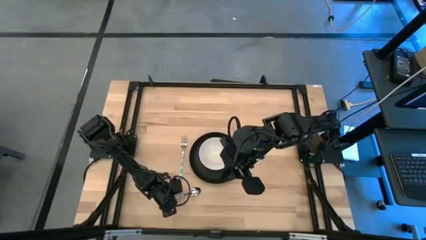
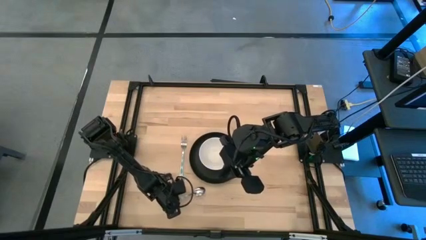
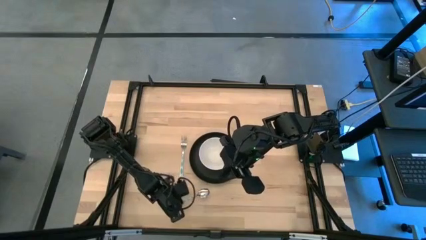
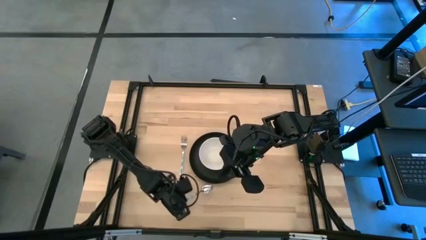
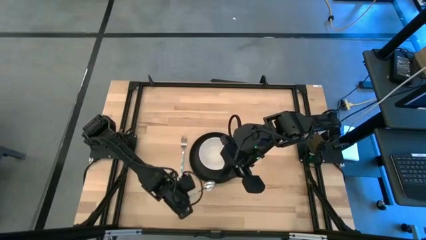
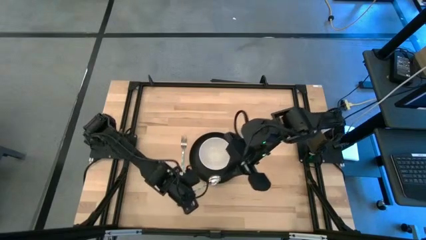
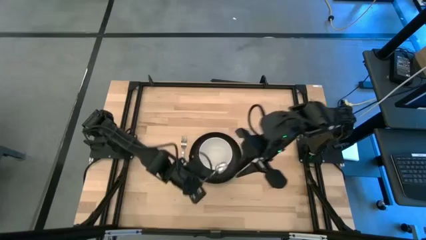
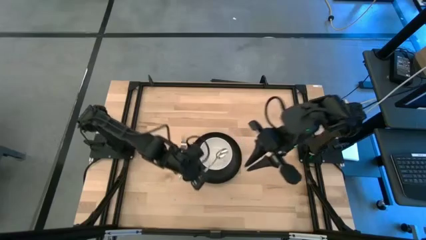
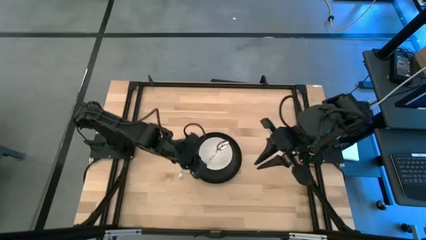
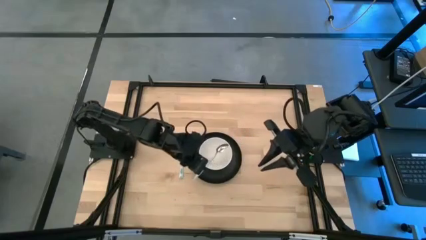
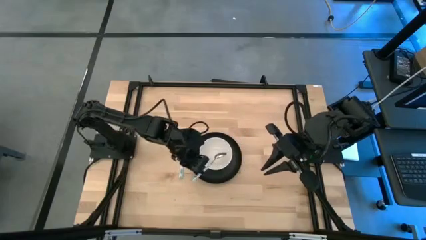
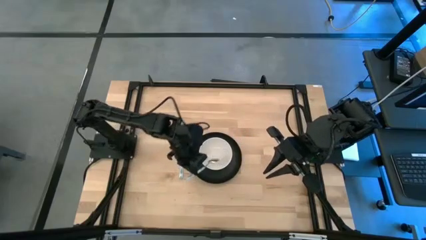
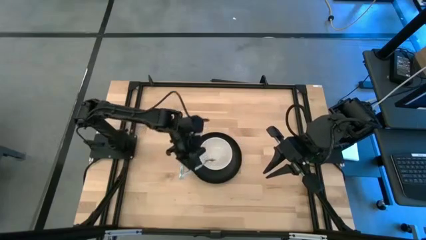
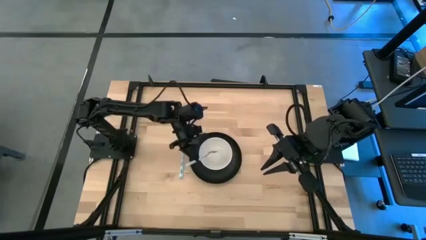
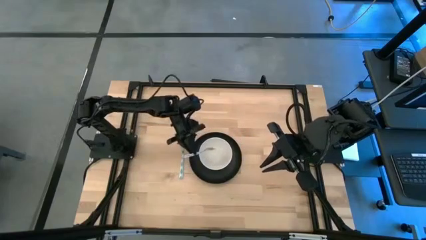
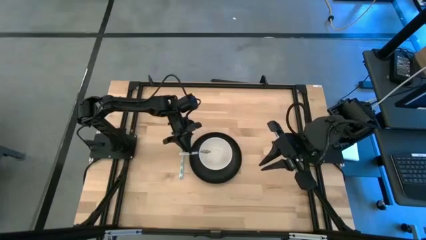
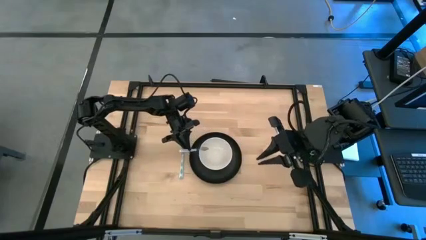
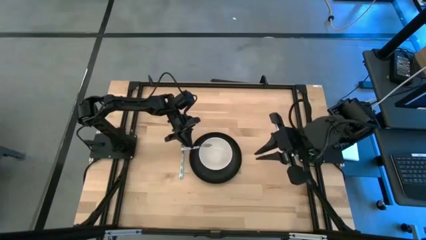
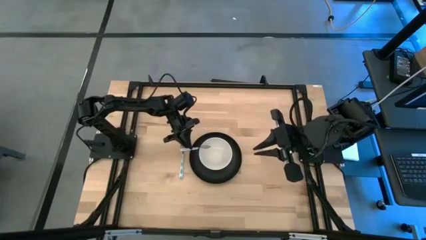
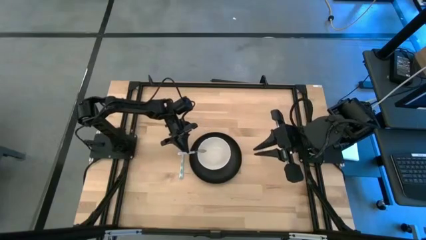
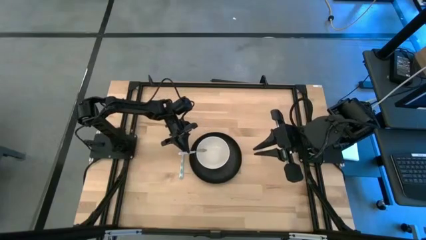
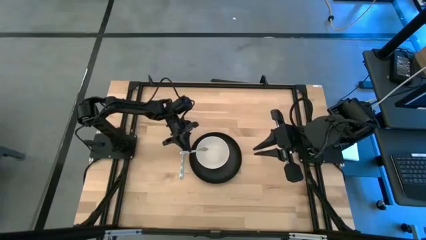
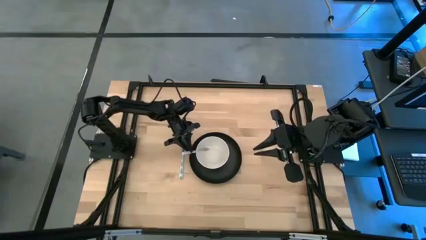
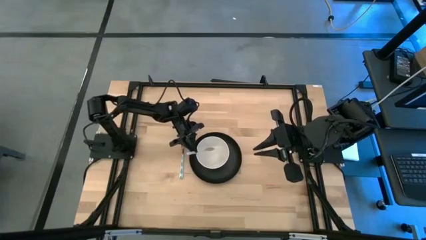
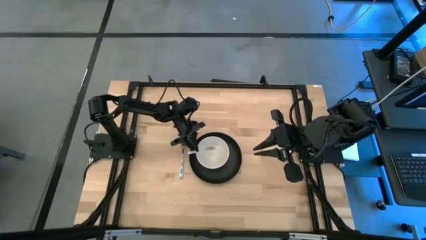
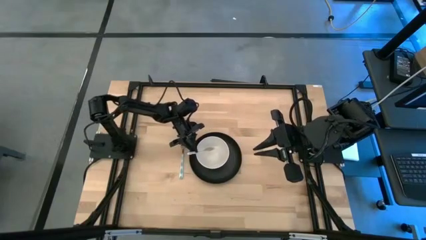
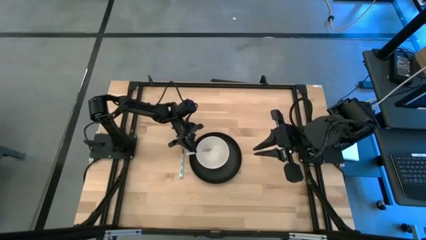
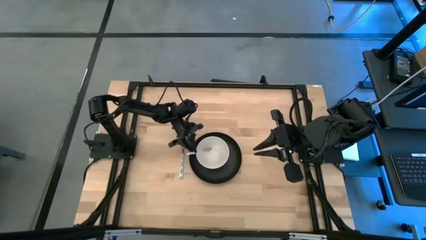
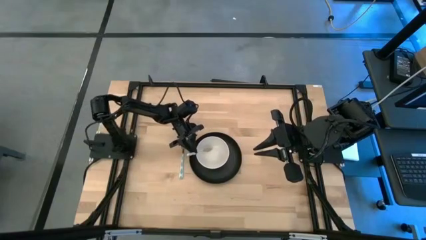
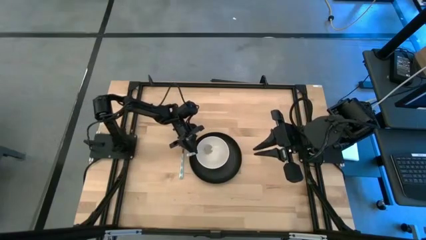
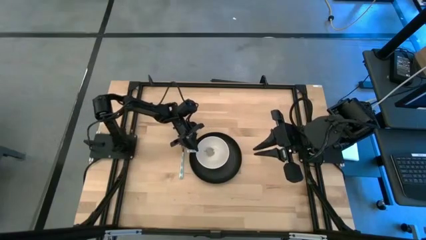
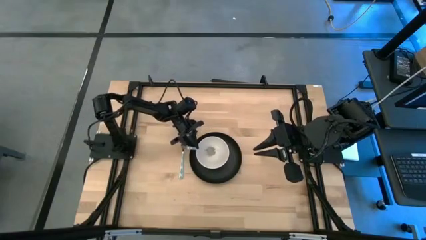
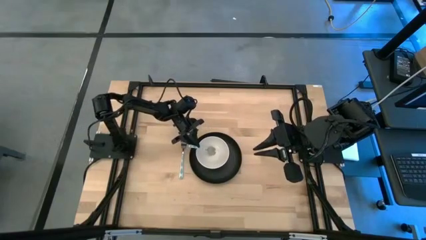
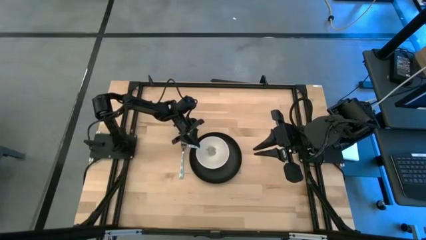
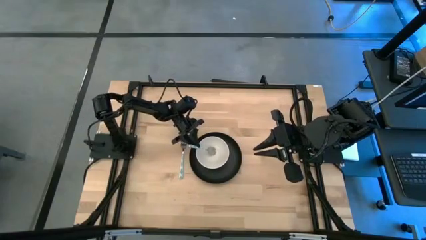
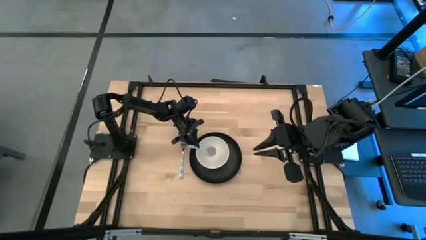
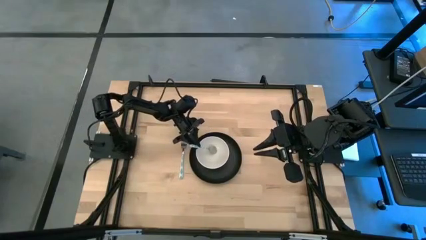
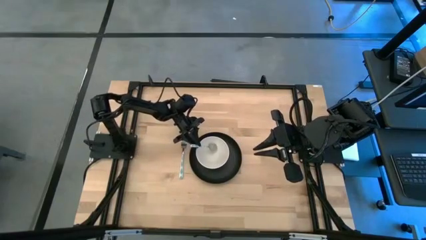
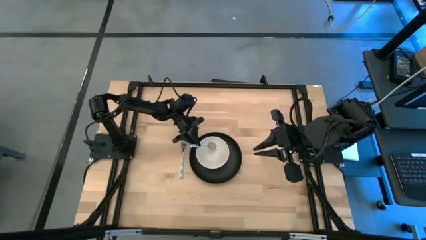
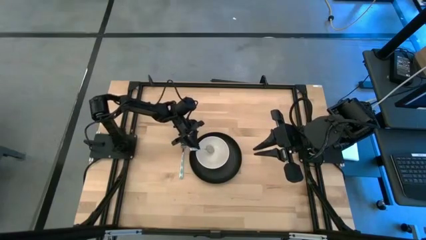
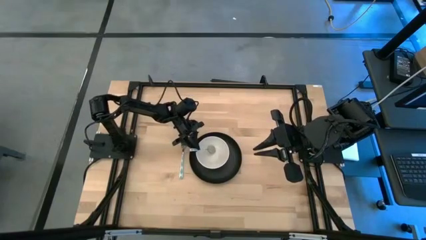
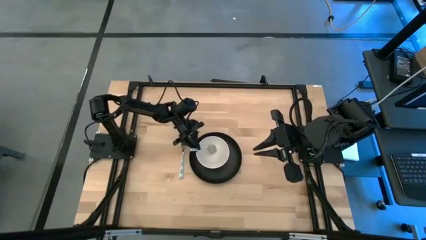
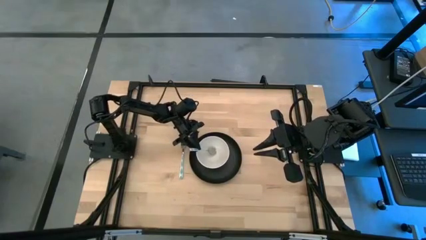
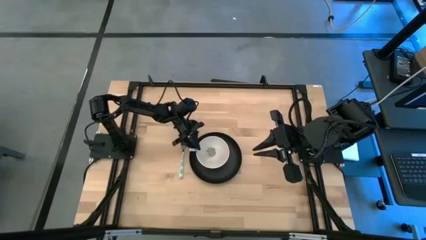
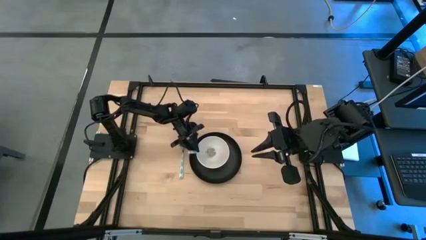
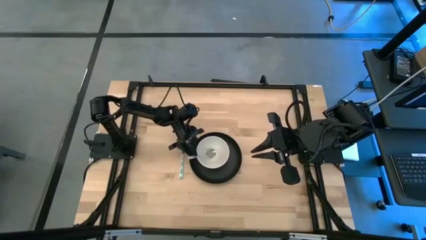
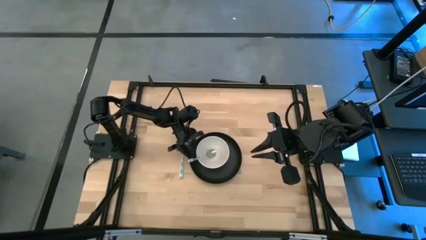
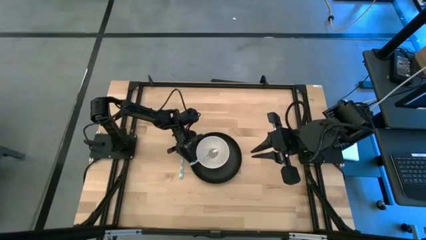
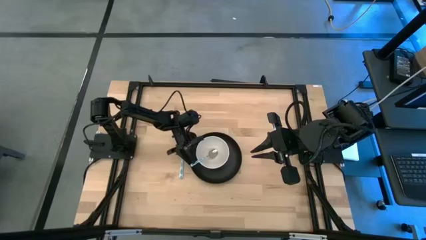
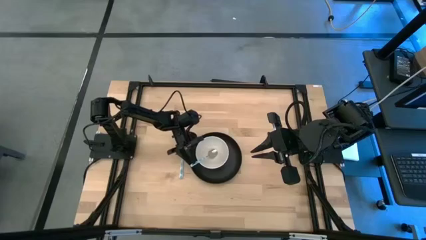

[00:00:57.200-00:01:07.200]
Task: Set table place
Put the blue spoon on the white bowl

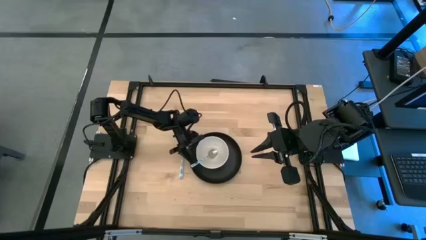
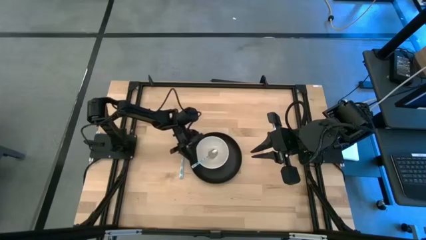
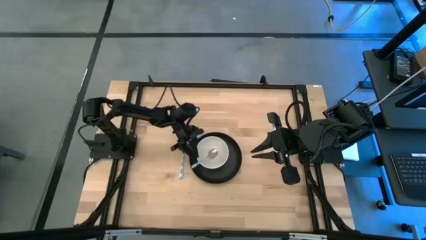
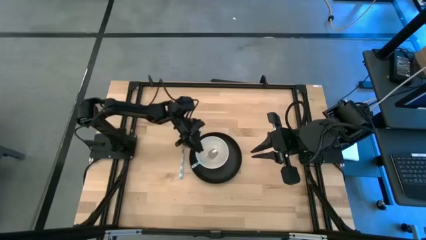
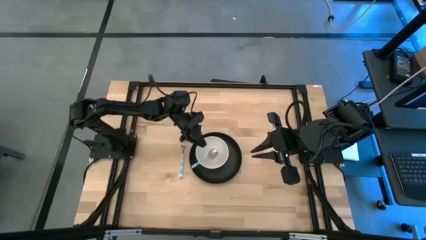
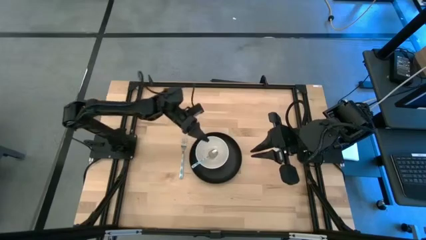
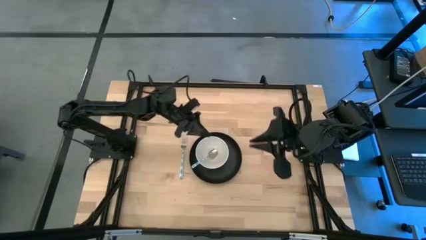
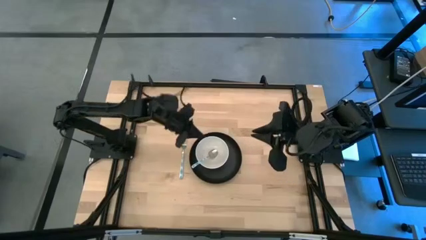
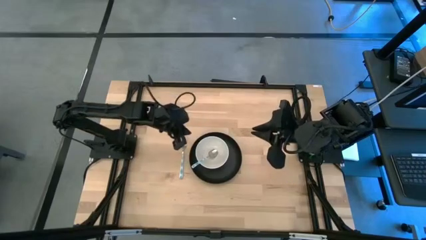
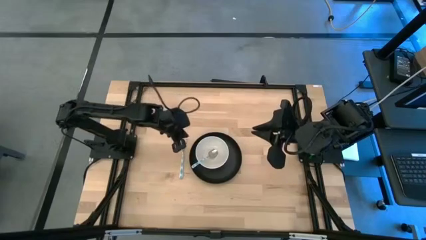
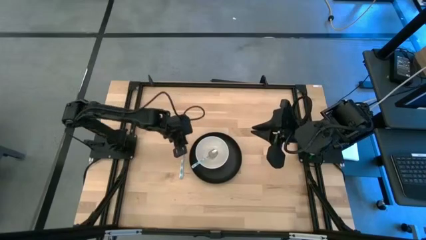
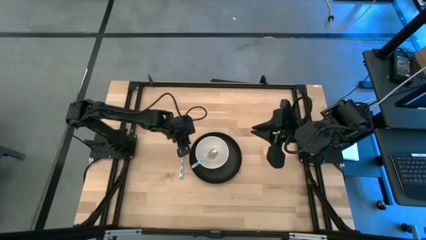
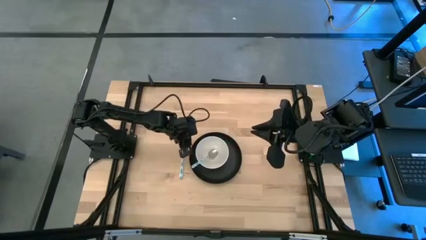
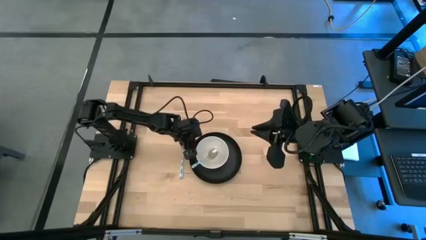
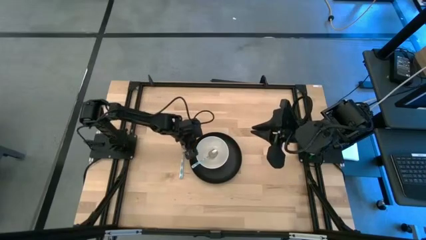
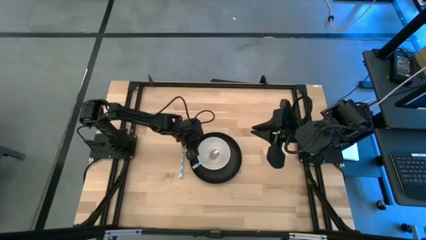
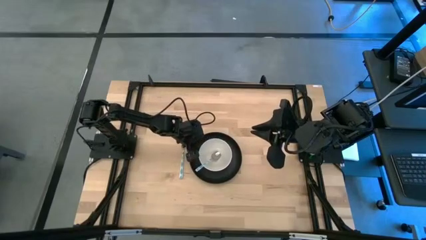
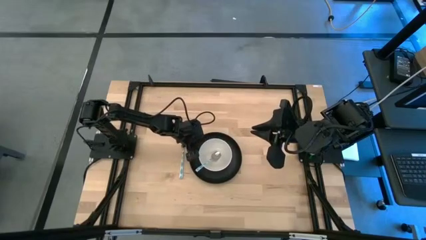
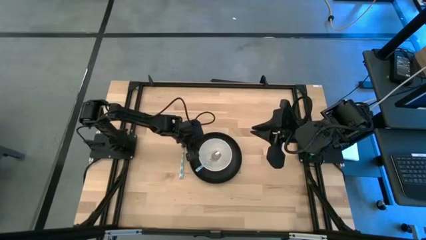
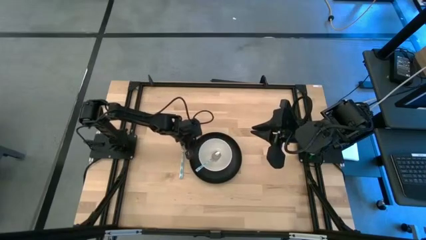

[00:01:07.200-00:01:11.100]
Adjust the white bowl

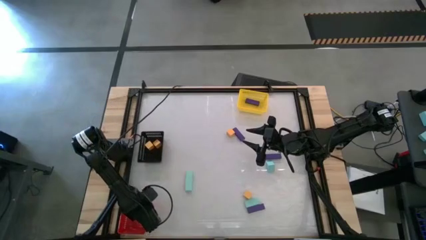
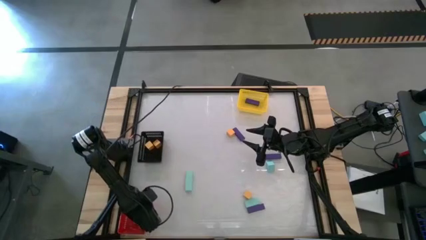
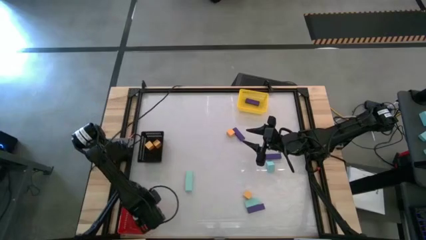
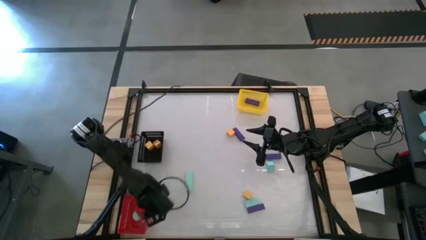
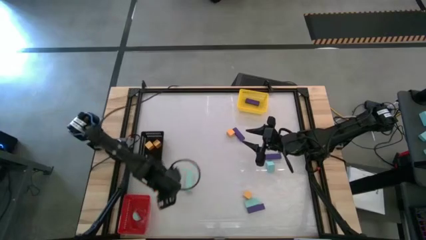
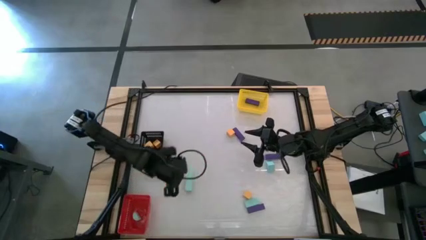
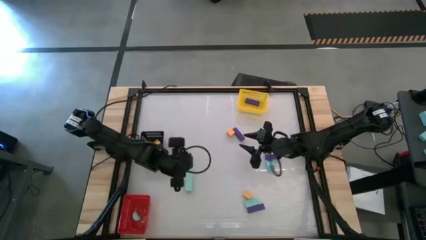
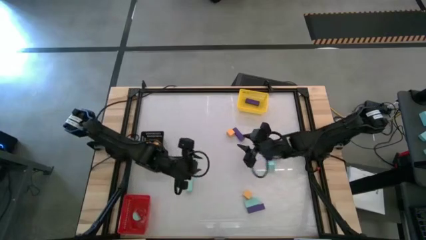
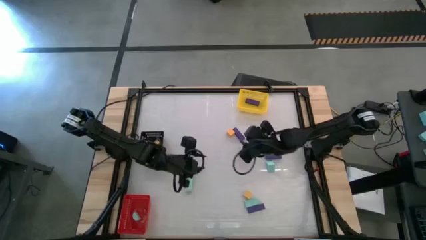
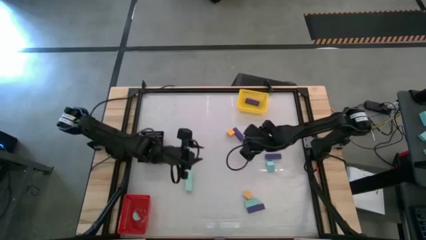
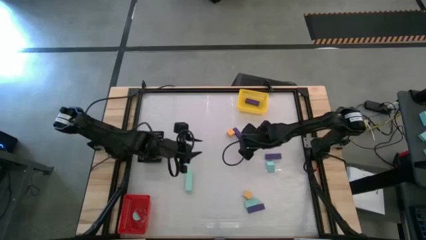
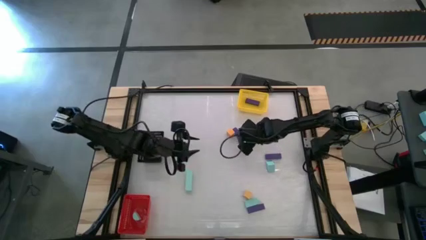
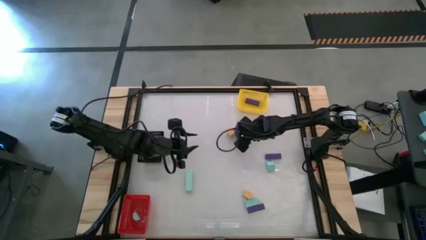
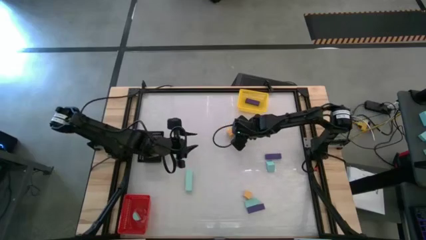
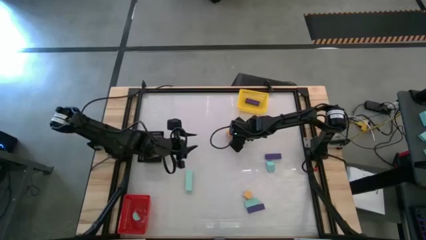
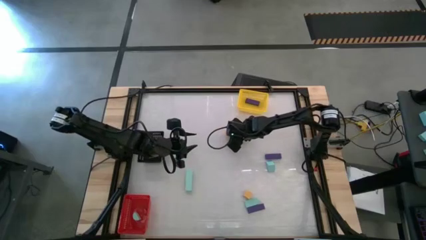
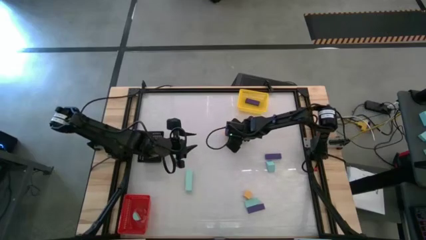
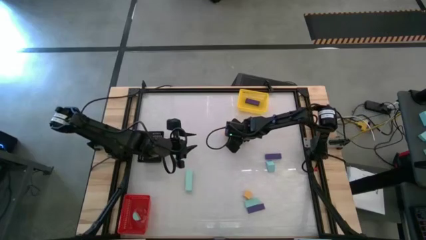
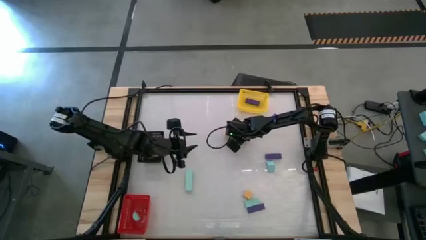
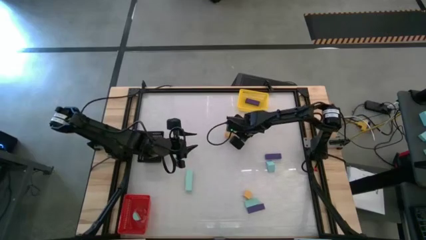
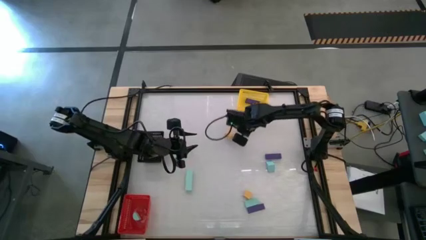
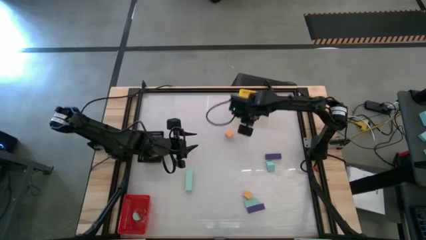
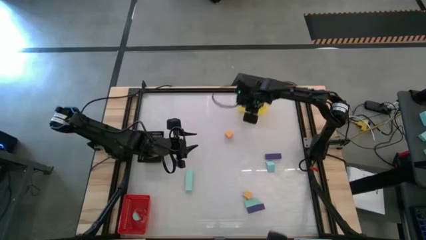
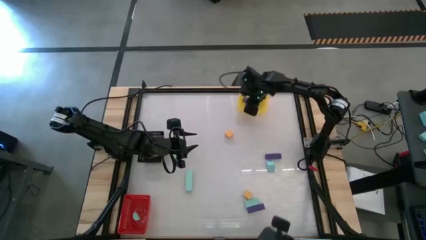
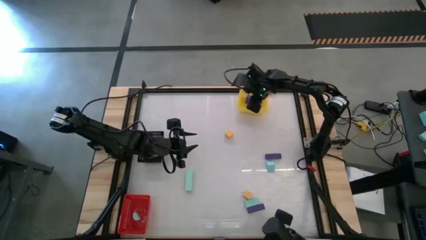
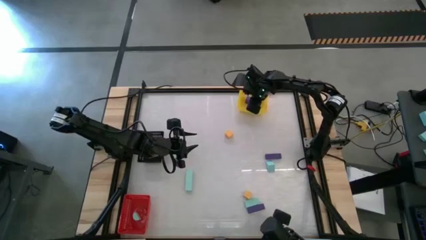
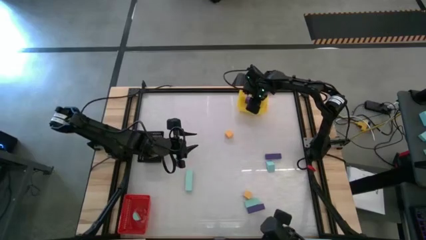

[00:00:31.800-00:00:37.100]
Task: Sort & place blocks by color
Put the purple block into the yellow bin
